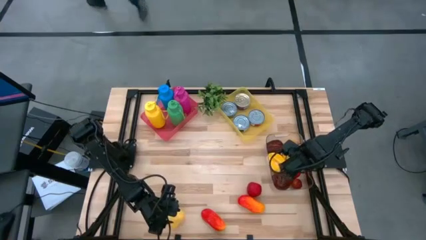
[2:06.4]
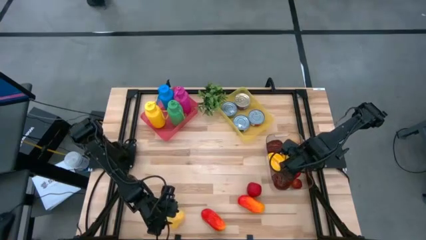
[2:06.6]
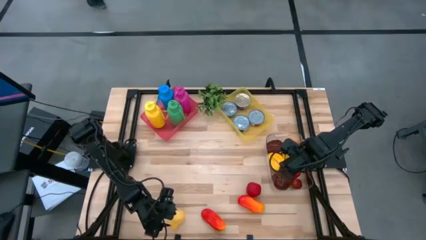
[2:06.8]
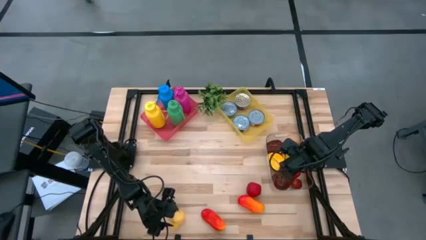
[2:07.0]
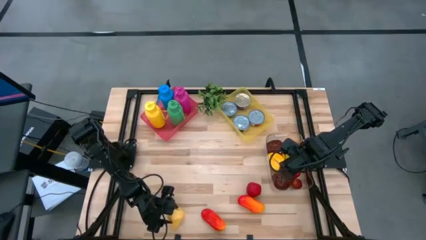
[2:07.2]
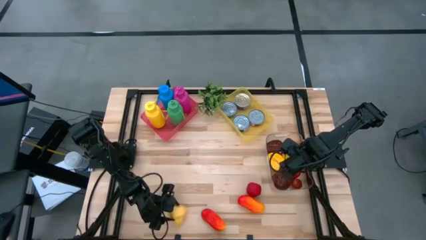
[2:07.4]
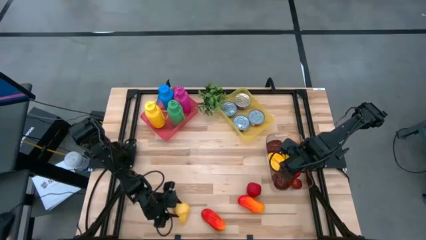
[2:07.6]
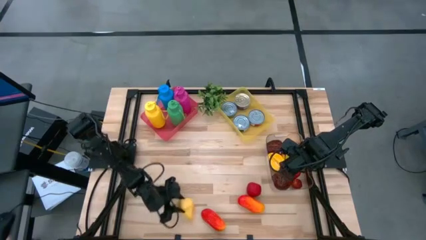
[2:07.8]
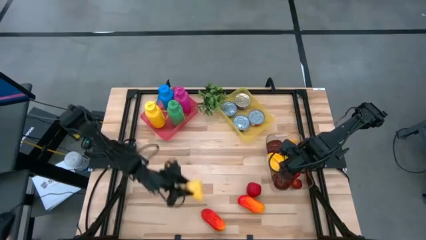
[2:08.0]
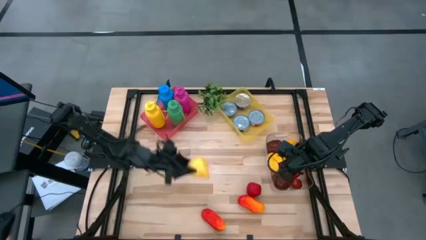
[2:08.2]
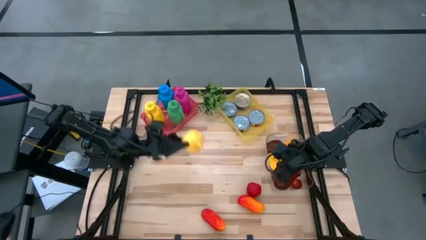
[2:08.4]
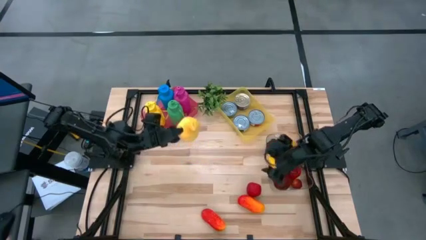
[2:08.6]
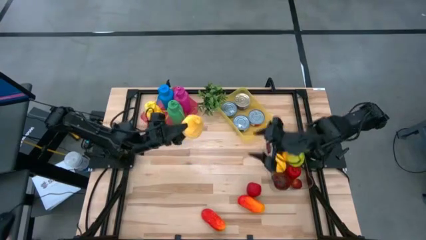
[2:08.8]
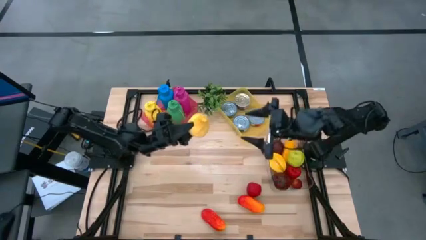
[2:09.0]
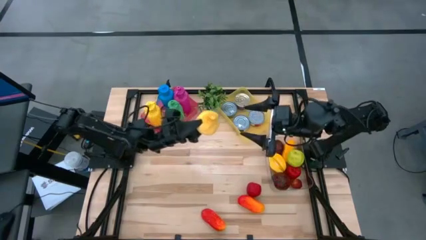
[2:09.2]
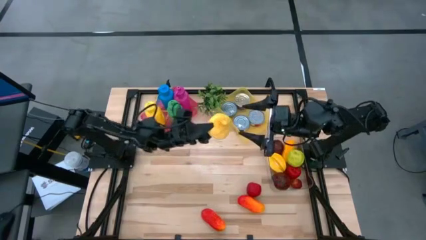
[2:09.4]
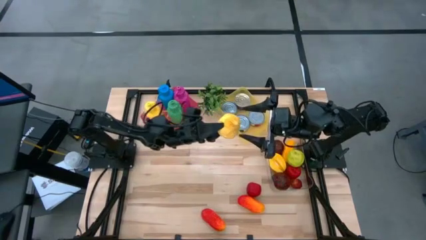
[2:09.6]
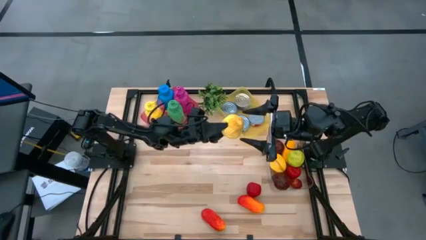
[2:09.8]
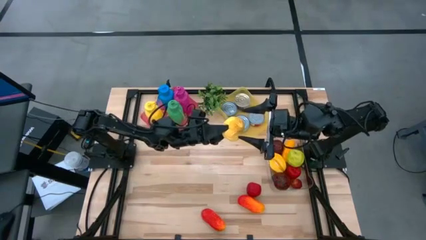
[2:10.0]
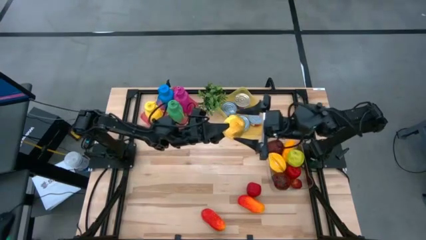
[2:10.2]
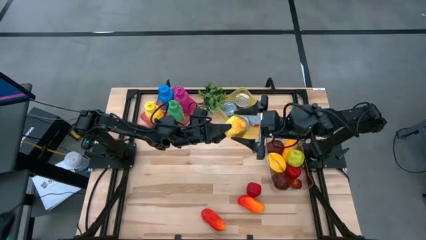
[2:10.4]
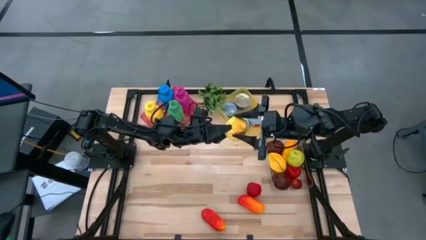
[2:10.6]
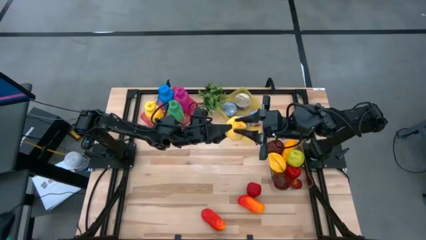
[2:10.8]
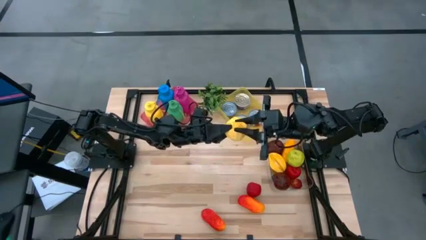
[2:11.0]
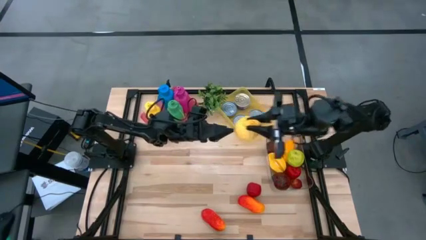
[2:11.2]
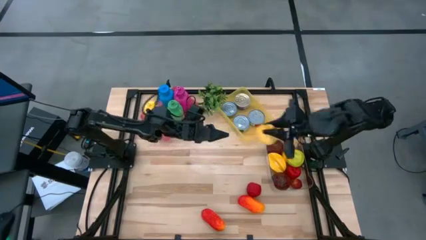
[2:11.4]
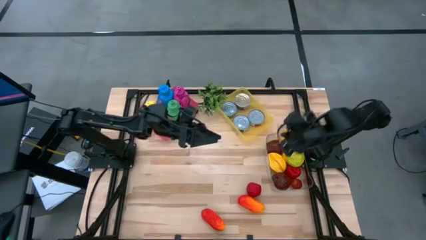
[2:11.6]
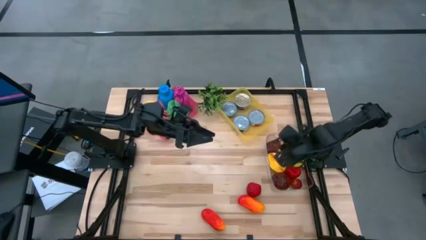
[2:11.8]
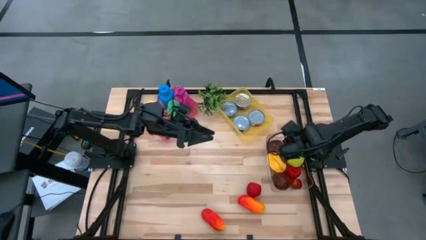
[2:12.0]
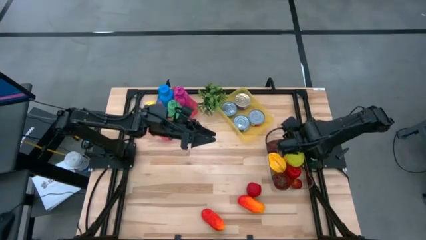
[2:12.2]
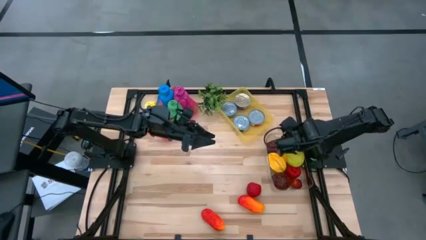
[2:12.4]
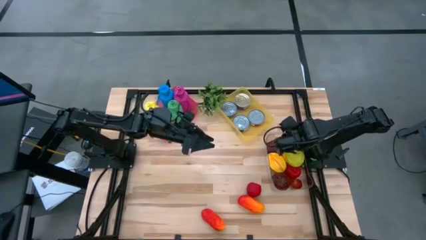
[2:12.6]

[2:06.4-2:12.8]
Task: Pick & Place Food Item
Put the pear into the transparent bin

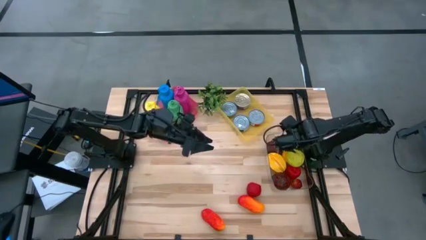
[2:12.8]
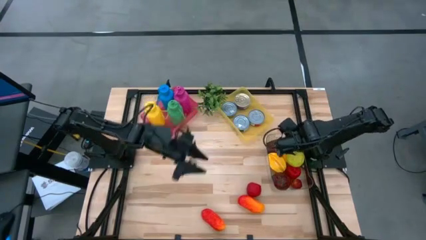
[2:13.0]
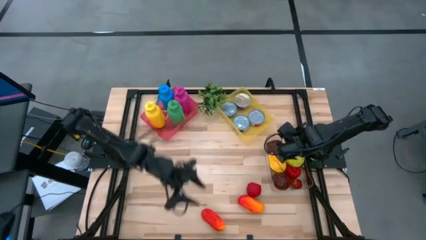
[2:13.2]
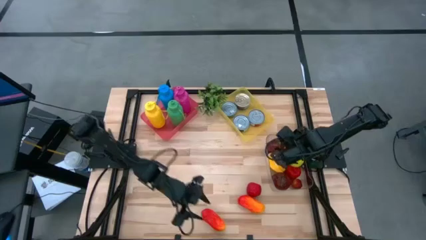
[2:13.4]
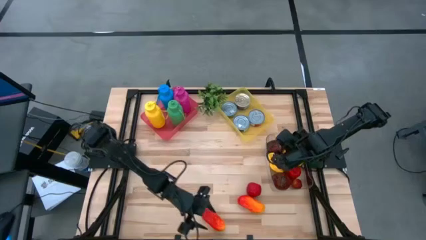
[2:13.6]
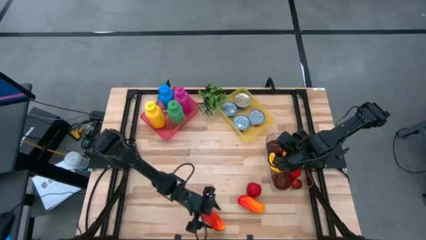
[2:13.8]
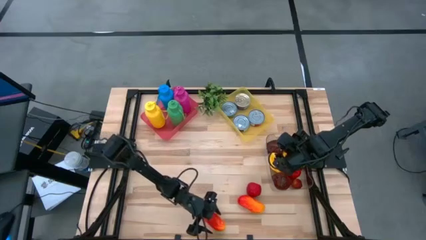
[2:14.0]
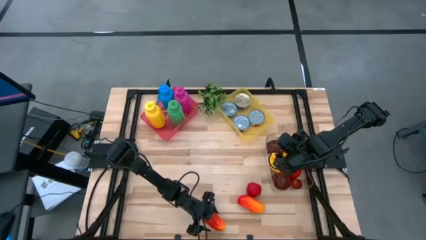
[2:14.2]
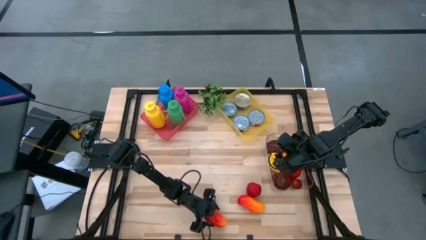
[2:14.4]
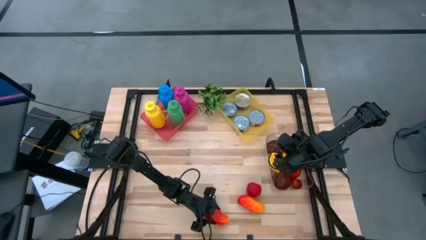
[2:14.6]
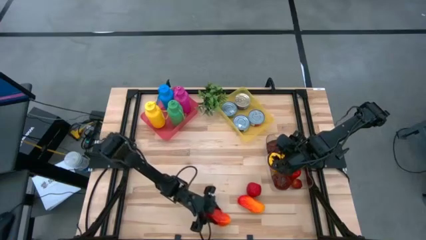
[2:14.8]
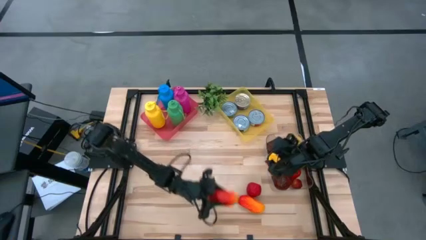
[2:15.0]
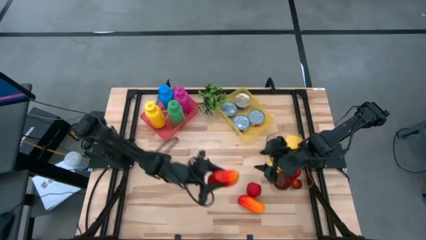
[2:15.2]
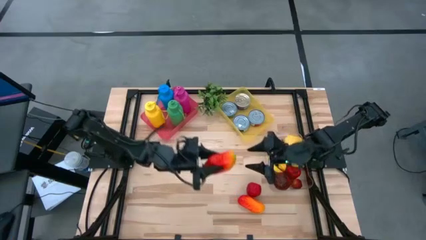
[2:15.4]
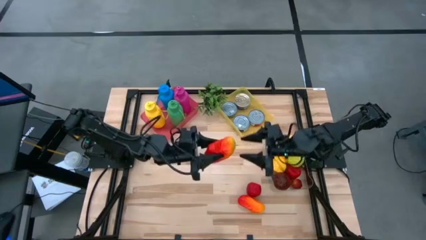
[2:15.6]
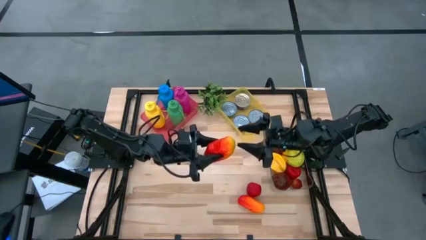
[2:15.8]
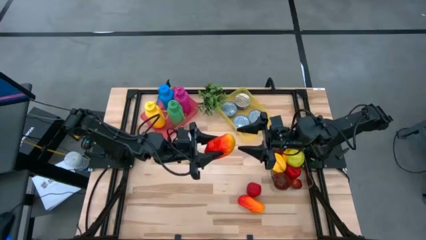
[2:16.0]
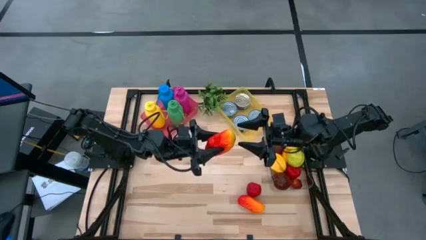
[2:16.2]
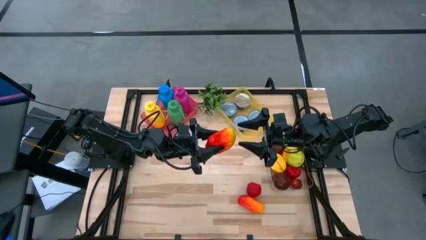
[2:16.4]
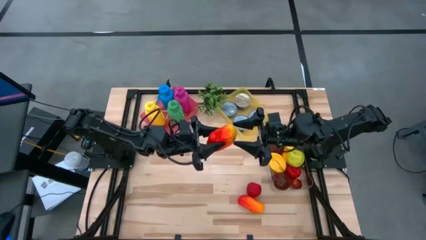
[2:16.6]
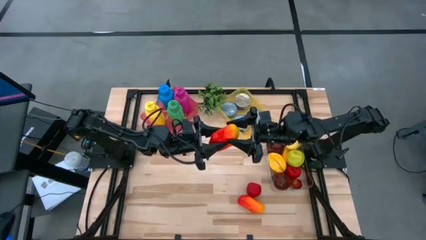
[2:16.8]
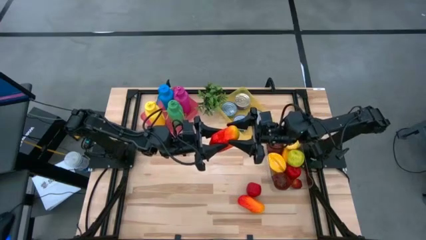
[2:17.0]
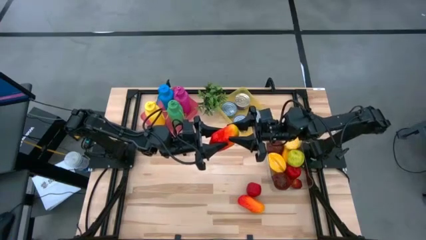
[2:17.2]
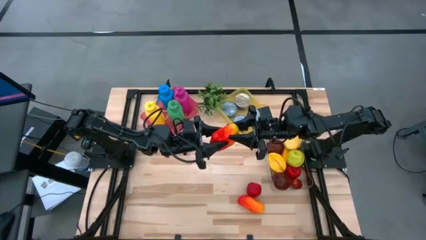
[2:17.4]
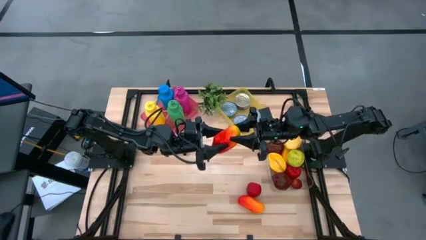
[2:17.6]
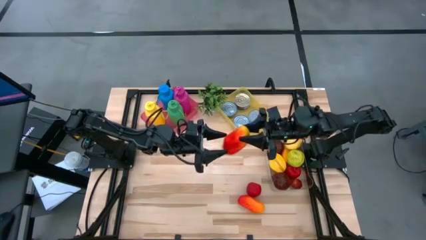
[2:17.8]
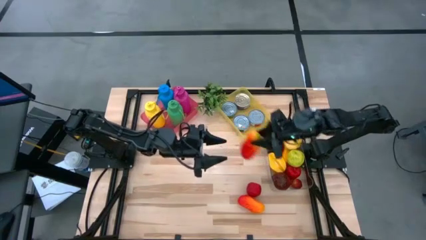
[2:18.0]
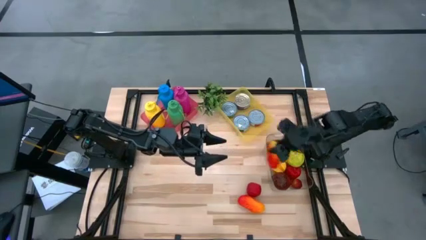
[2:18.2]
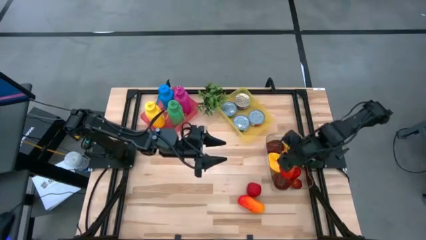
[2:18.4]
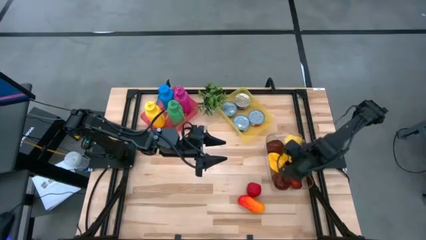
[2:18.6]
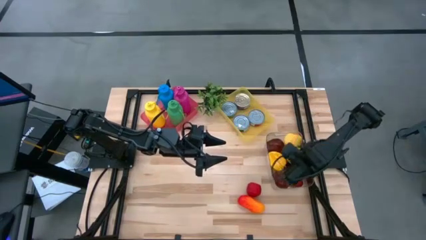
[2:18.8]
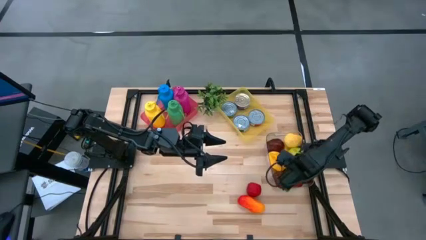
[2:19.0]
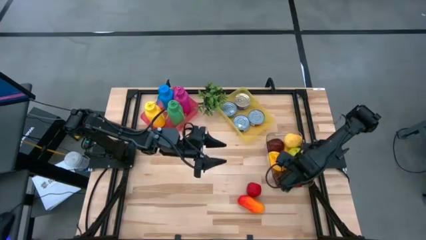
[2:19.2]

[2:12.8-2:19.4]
Put the bottom red mango into the transparent bin

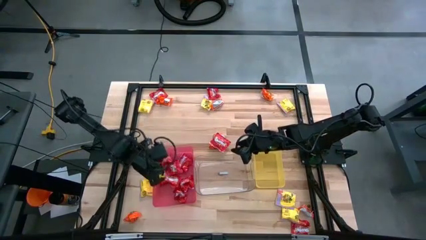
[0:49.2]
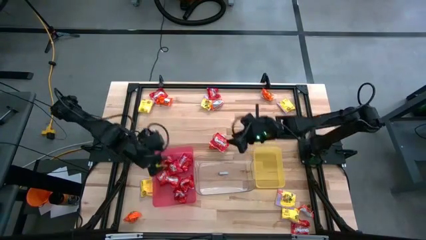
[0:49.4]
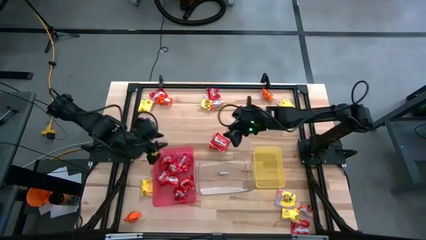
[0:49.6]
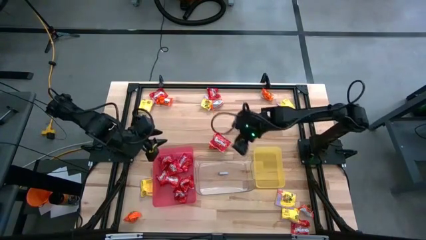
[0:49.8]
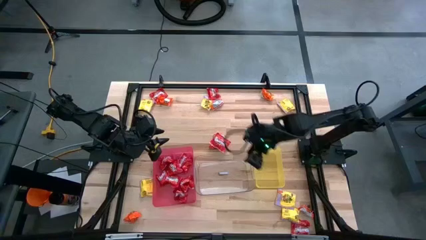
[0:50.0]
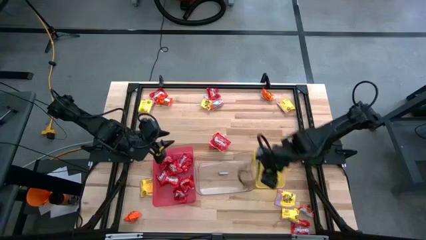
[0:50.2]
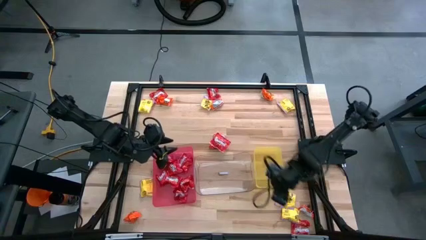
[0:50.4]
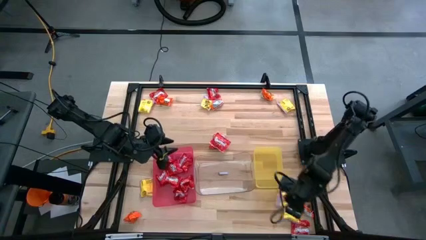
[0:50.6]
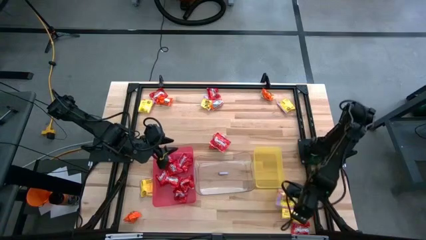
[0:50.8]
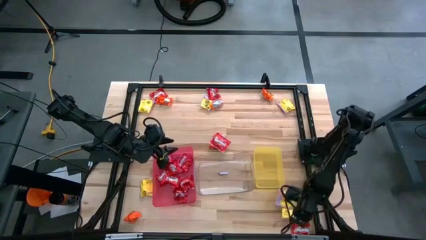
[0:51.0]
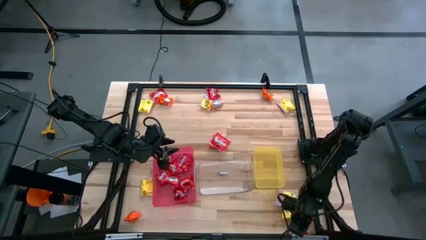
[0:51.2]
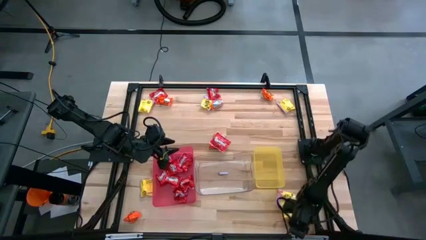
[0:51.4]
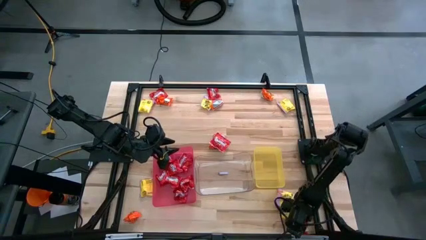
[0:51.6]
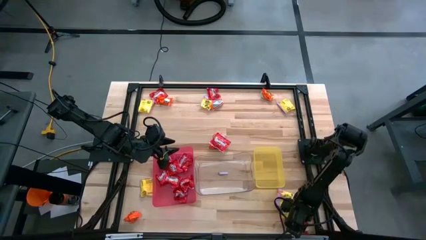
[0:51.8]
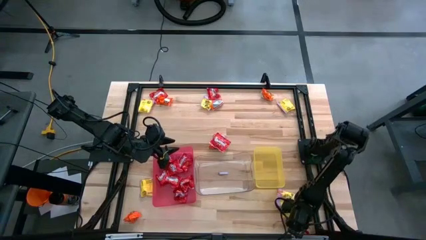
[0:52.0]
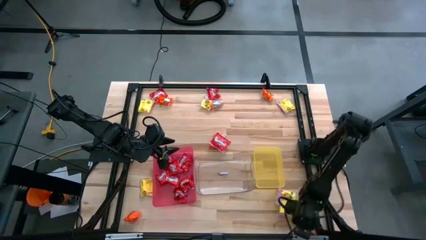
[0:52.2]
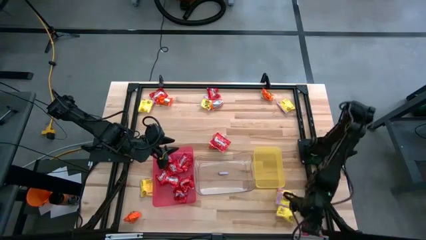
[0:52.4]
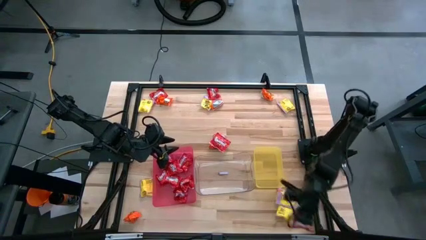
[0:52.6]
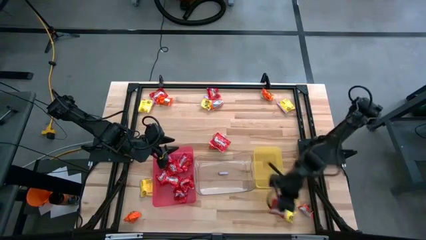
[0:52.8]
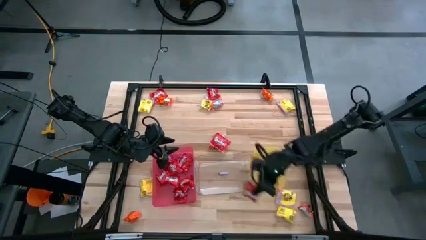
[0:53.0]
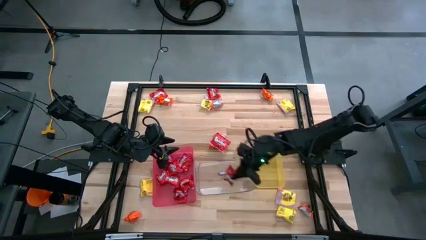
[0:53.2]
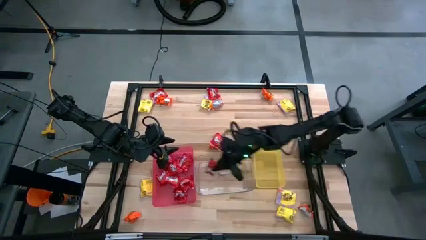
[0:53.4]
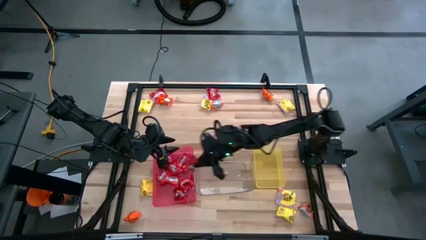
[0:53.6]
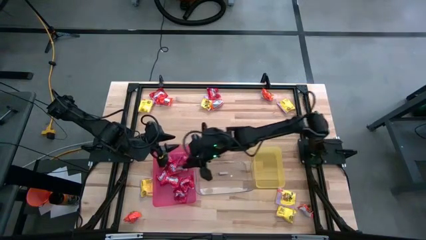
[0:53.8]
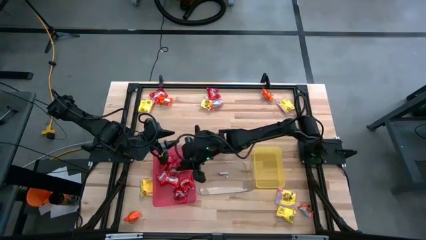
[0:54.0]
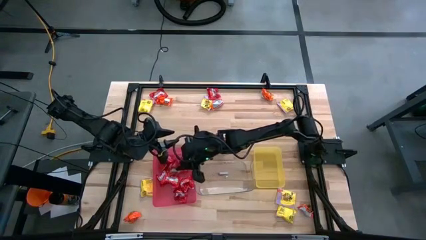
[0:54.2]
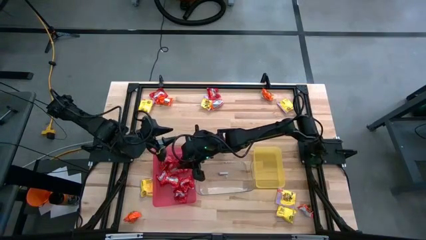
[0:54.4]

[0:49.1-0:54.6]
Task: Sort candy
Put the red candy into the red bin
